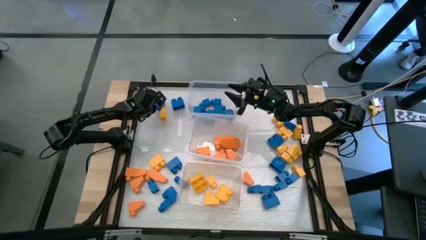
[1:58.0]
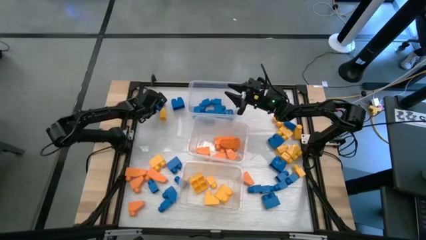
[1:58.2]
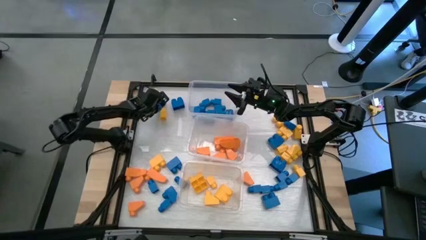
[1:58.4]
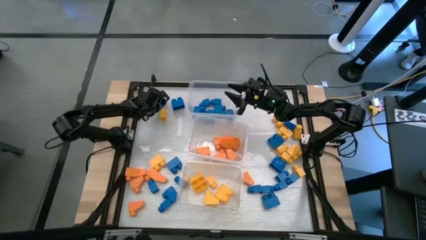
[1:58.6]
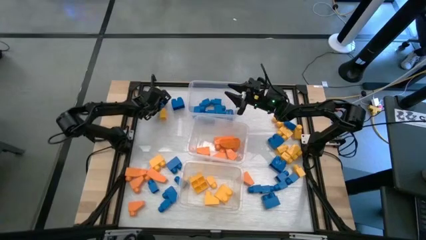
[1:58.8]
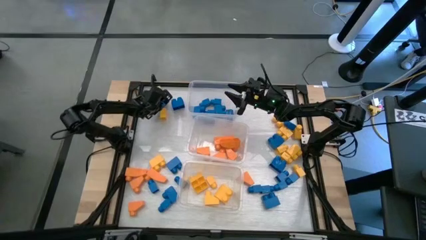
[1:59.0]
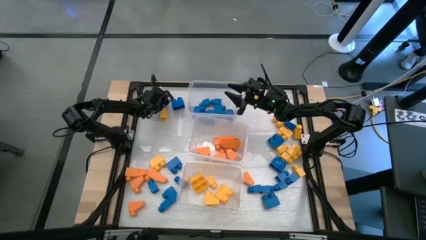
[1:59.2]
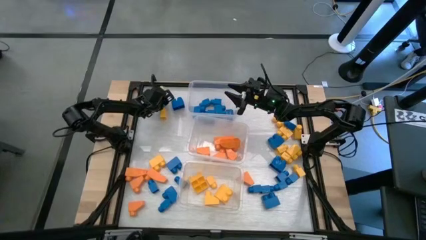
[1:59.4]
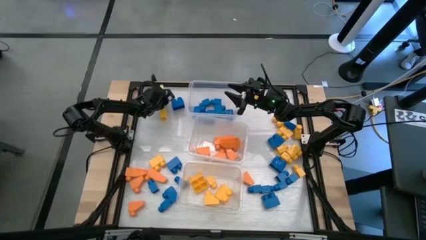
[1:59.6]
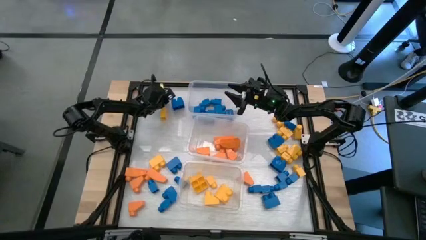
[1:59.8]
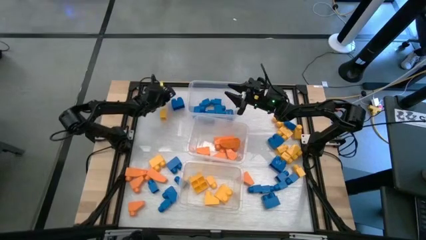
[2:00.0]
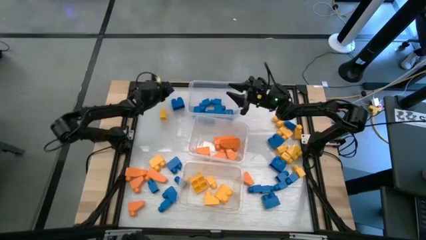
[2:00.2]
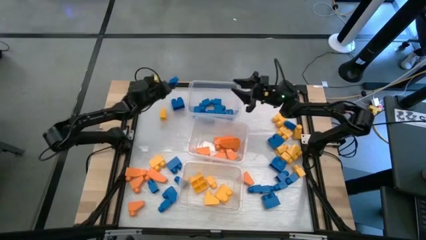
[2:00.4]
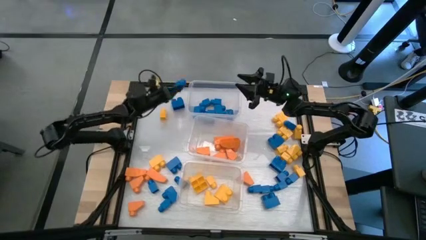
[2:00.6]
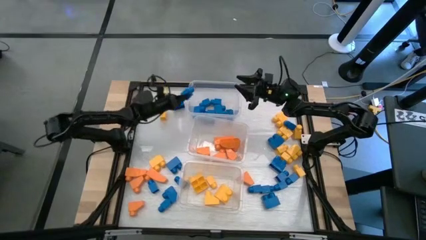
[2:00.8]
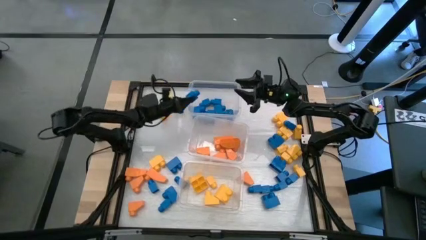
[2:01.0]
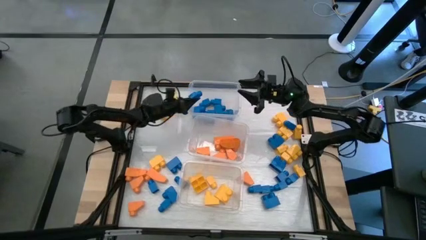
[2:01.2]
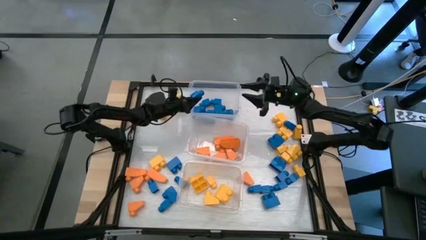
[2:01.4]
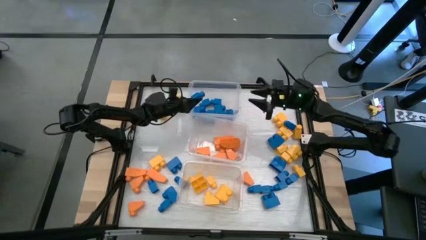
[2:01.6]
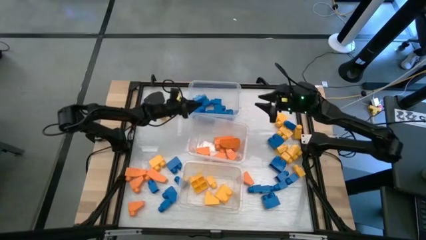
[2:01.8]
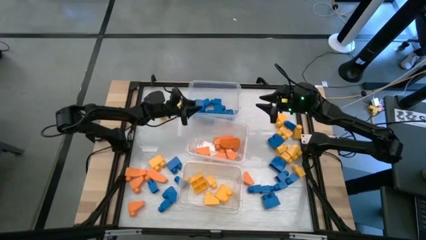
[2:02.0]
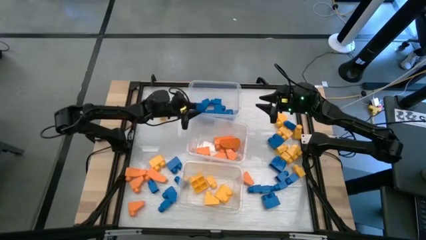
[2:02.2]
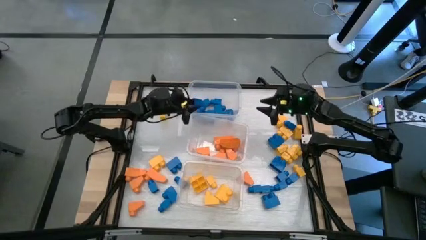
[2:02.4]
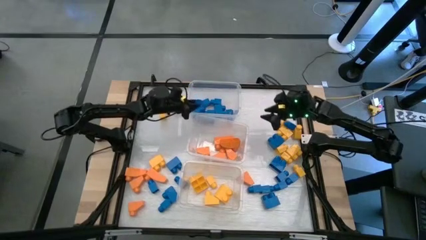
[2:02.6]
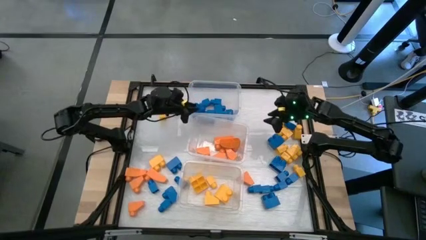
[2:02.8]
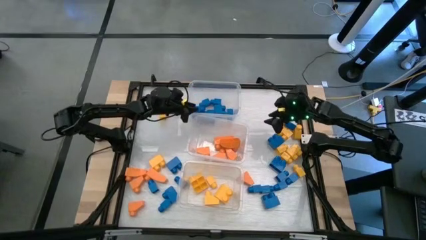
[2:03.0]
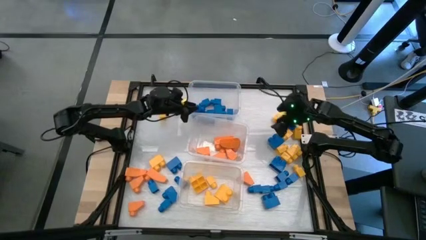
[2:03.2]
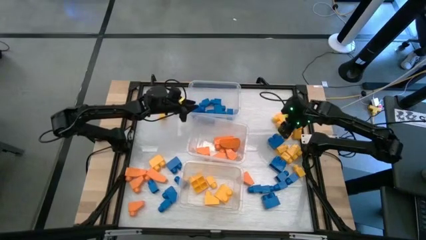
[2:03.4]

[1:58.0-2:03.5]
Task: Sort blocks
Put the blue game piece into the top transparent bin

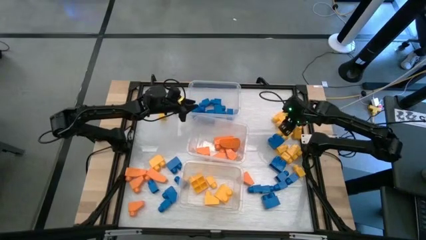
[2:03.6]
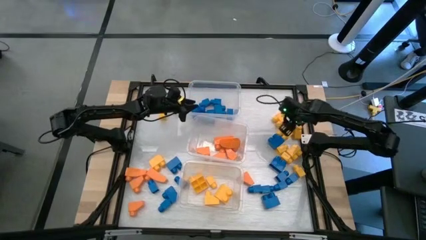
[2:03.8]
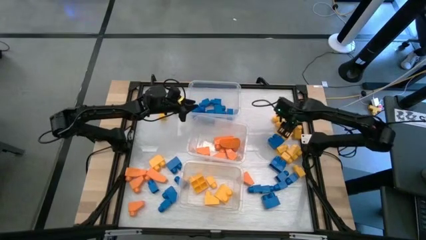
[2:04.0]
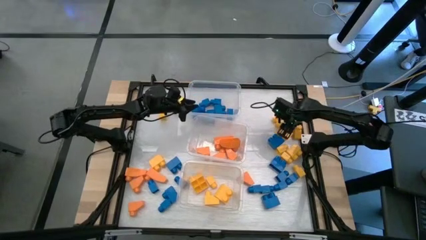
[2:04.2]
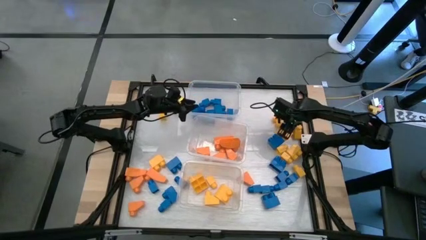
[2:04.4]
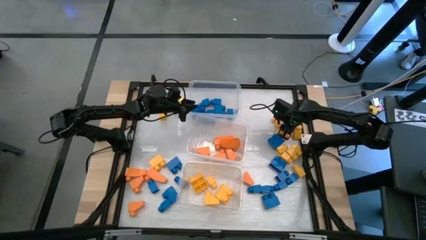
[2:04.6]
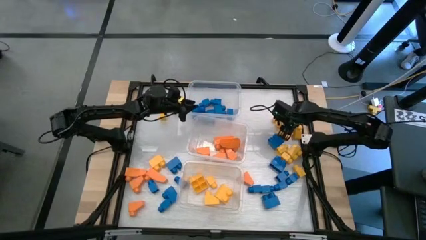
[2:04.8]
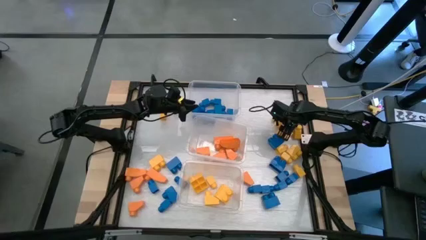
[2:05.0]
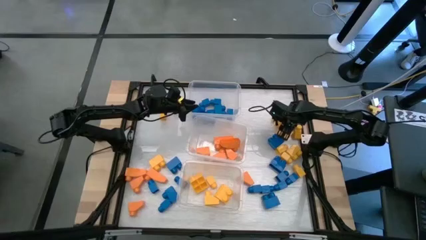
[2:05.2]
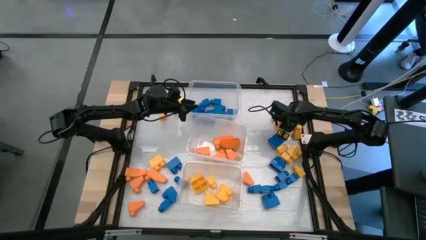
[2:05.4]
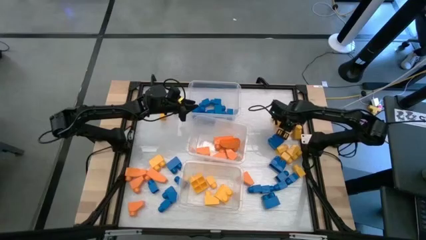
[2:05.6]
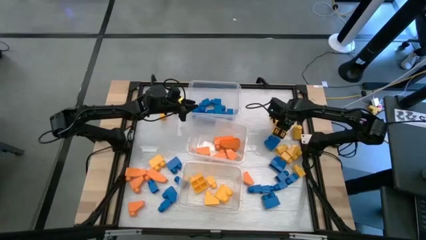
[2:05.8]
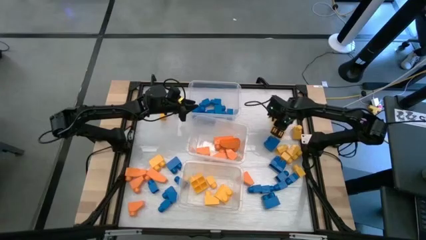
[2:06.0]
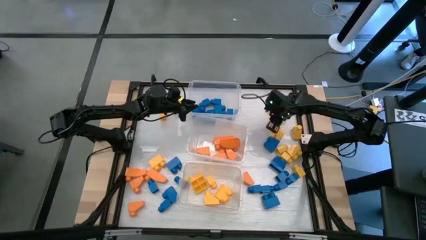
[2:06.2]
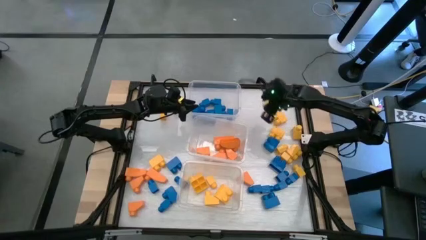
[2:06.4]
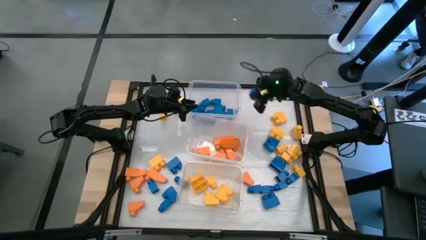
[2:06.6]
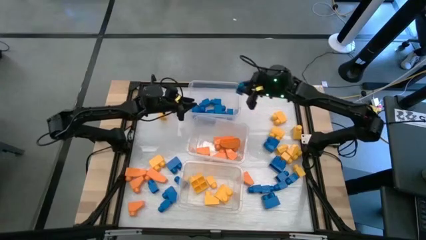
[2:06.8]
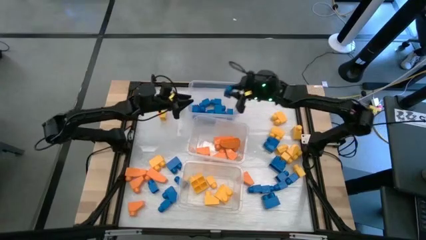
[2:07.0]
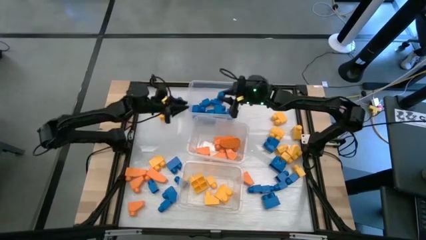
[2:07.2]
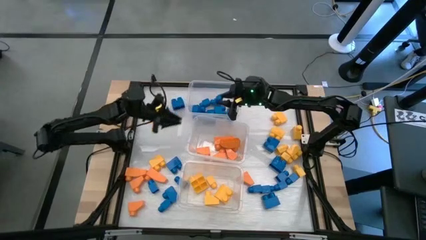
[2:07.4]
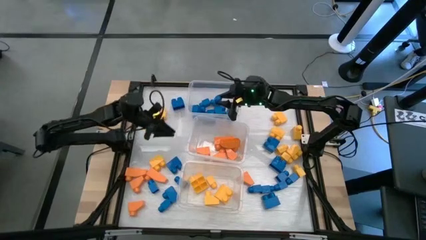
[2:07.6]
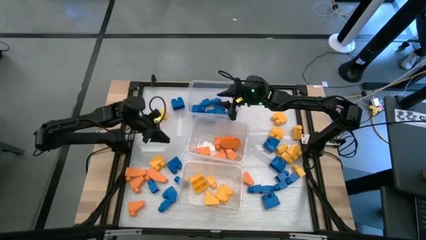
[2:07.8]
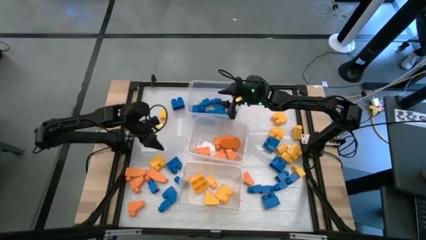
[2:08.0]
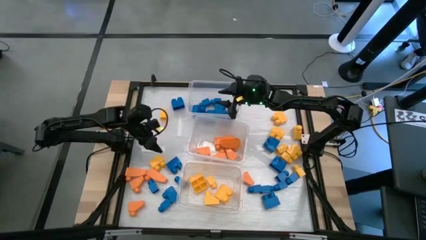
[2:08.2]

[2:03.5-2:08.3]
Put the blue game piece into the top transparent bin

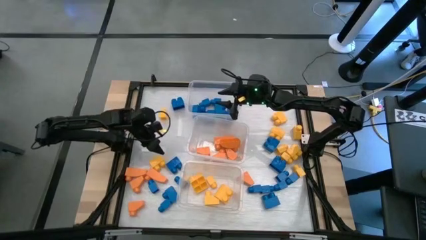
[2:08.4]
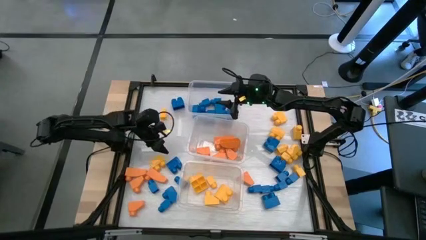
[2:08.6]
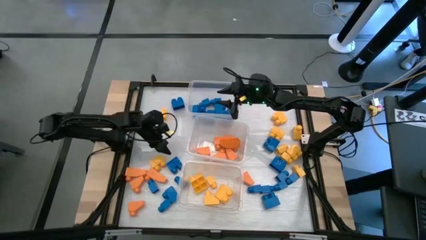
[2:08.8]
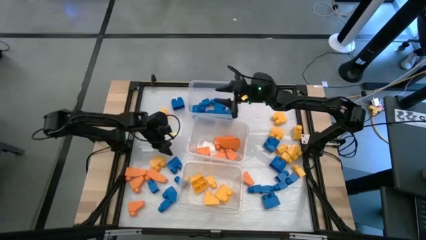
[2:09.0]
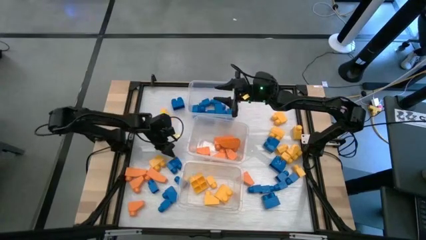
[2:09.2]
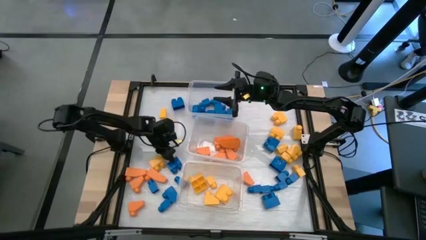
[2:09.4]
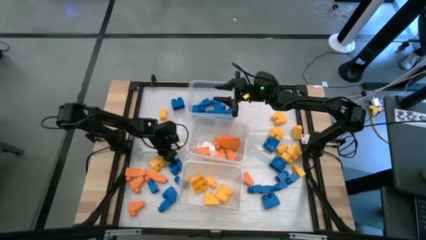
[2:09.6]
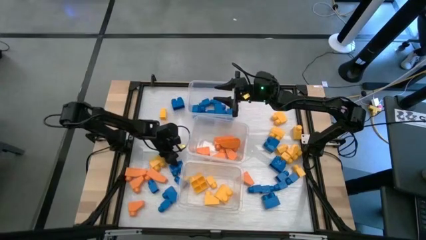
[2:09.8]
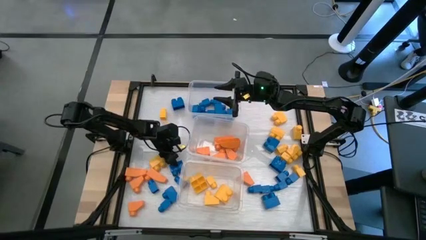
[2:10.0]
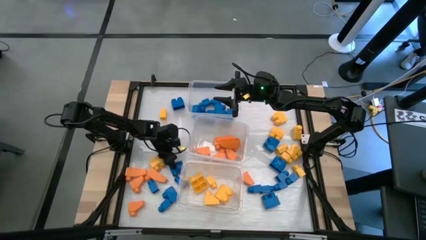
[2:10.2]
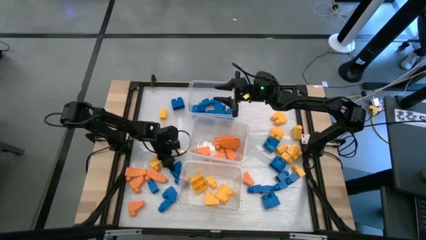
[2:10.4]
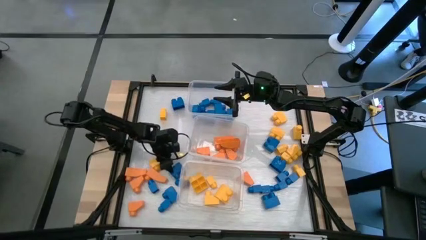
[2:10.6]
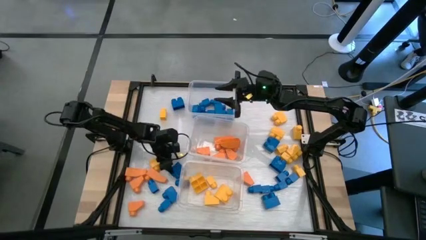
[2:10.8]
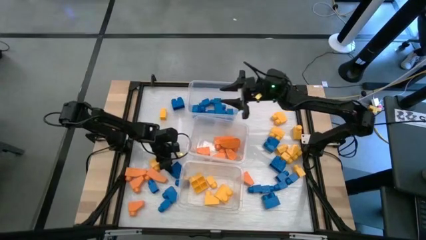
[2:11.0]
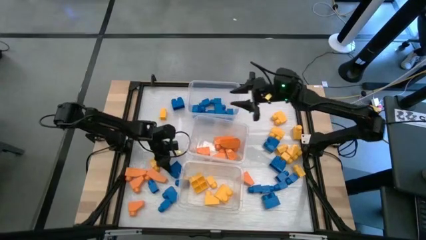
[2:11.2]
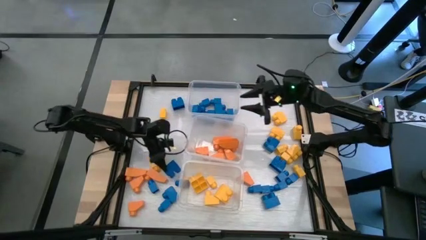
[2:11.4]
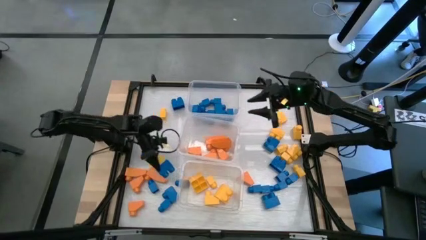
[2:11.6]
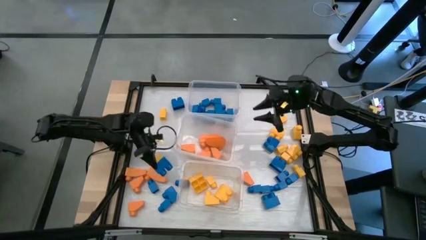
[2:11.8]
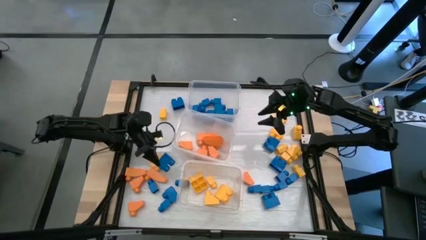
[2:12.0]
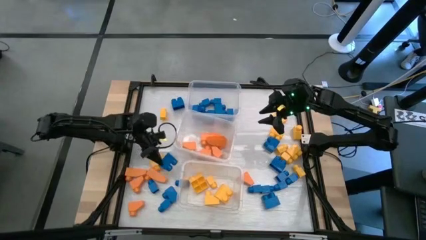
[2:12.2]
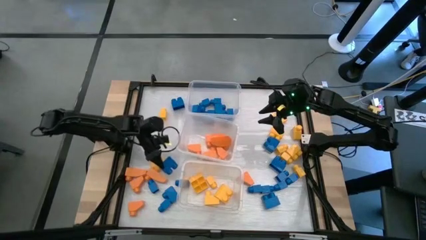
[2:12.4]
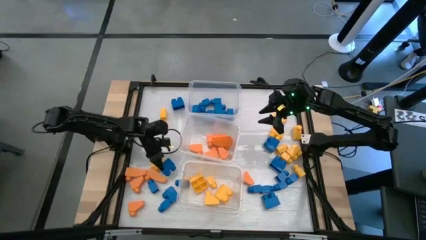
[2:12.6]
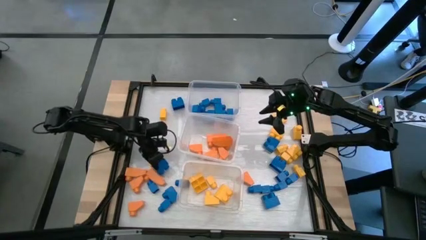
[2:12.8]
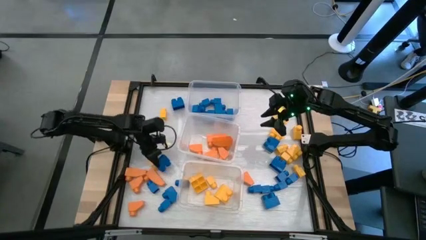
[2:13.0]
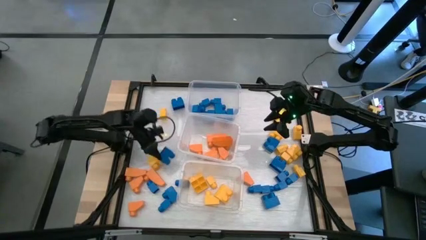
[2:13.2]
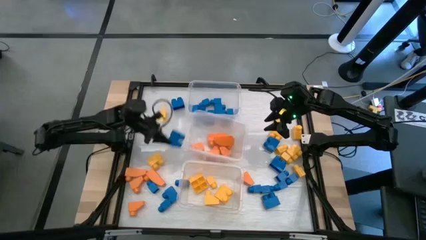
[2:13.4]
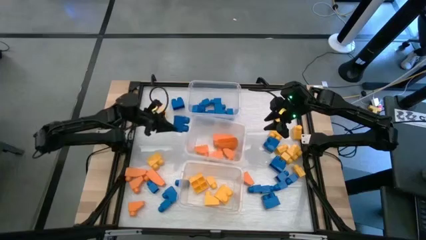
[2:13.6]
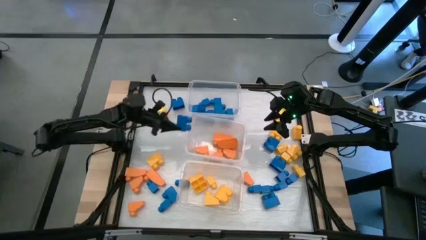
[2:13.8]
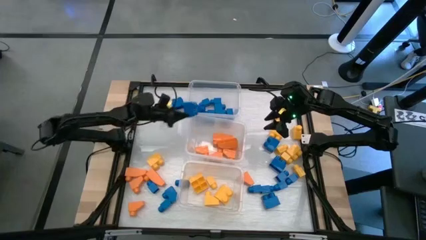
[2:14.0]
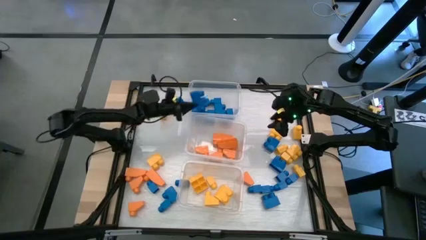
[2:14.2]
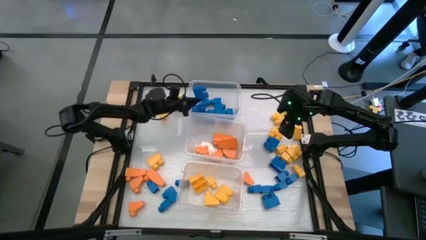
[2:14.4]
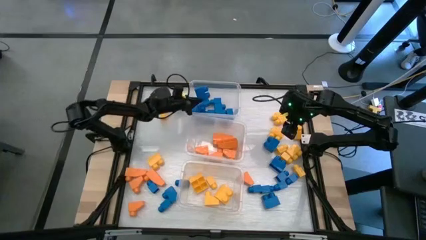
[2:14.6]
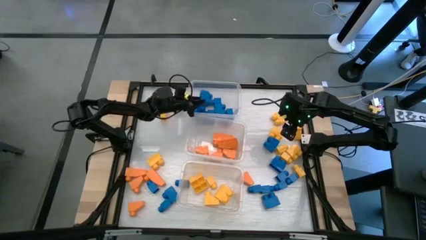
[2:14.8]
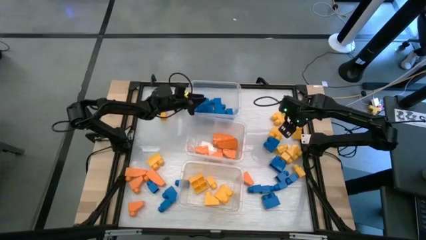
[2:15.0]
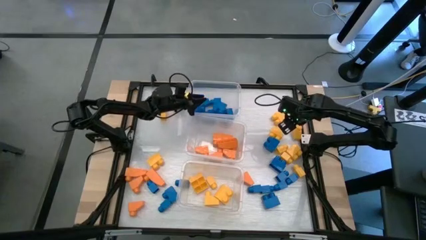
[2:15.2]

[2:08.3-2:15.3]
Put the blue game piece into the top transparent bin
